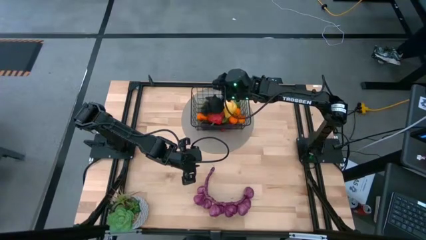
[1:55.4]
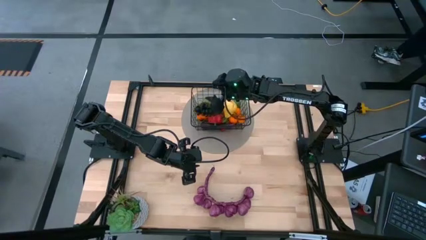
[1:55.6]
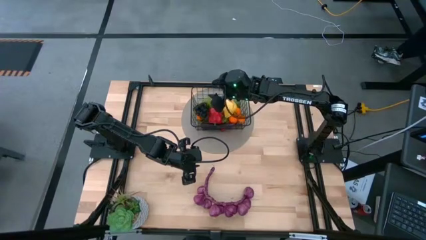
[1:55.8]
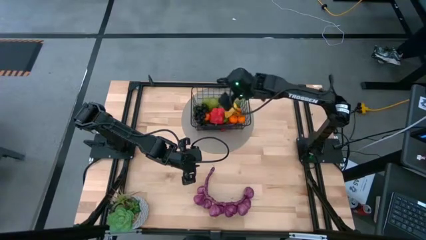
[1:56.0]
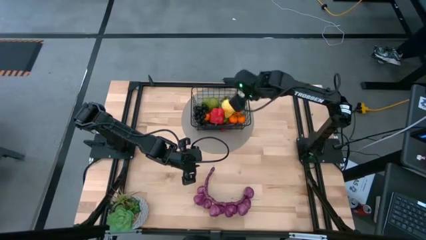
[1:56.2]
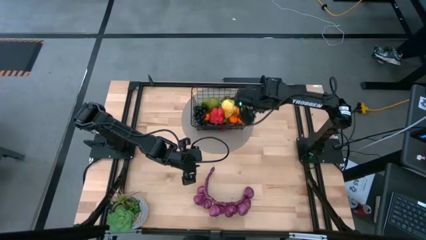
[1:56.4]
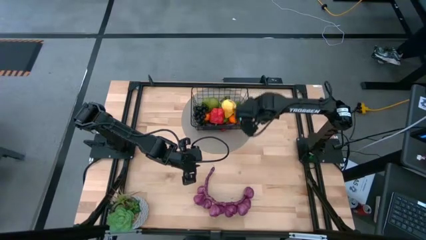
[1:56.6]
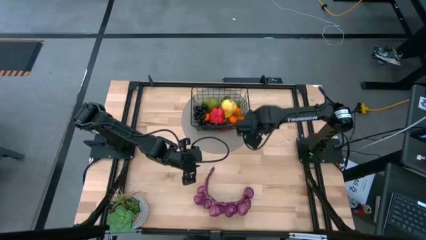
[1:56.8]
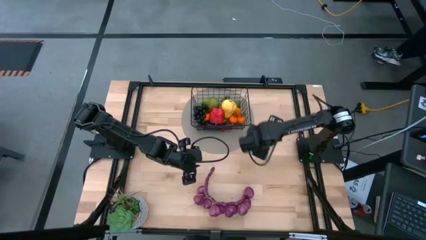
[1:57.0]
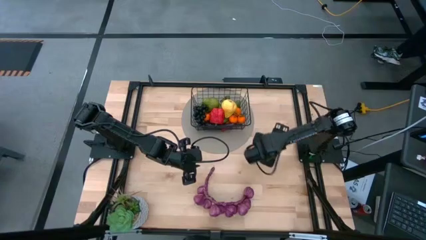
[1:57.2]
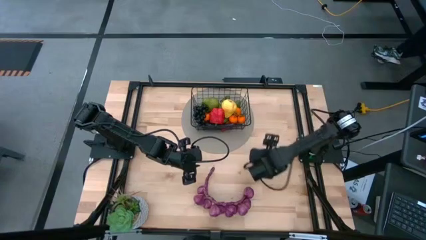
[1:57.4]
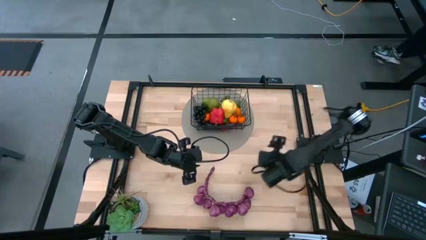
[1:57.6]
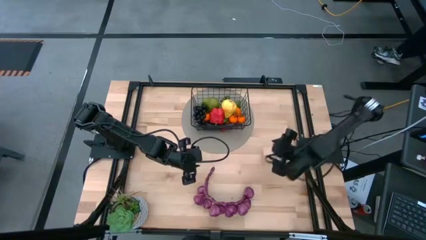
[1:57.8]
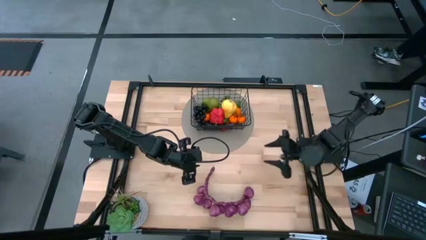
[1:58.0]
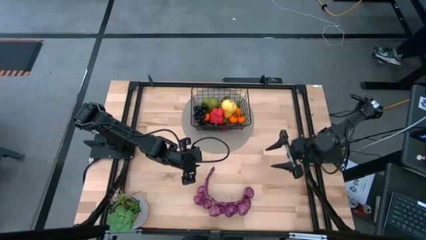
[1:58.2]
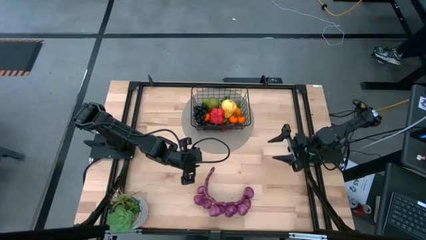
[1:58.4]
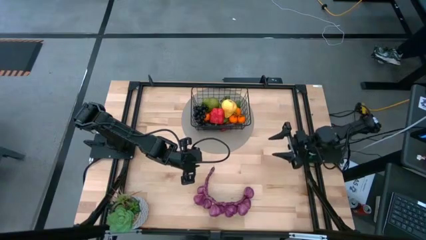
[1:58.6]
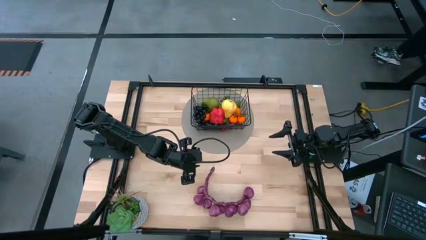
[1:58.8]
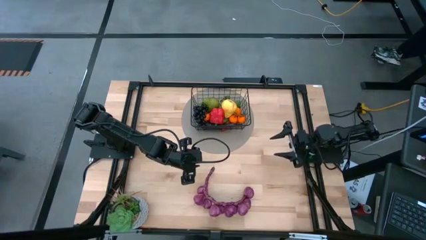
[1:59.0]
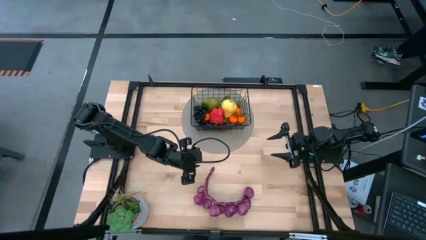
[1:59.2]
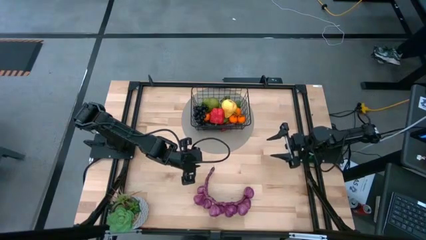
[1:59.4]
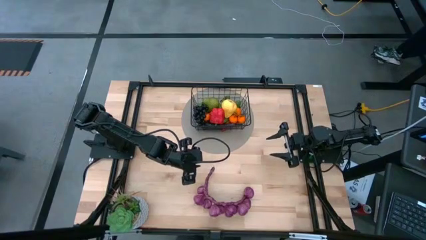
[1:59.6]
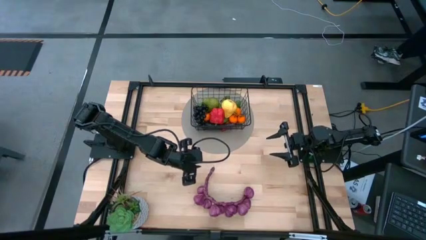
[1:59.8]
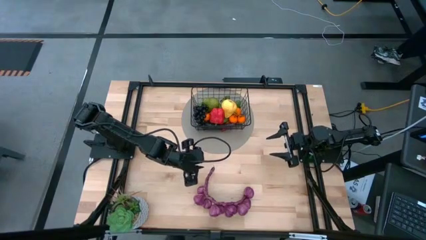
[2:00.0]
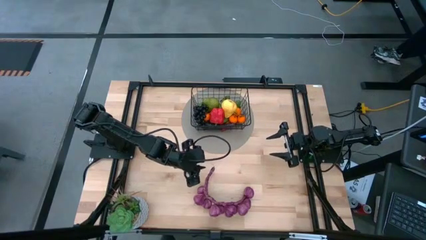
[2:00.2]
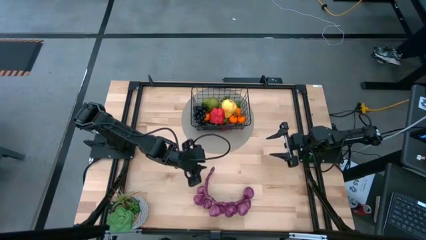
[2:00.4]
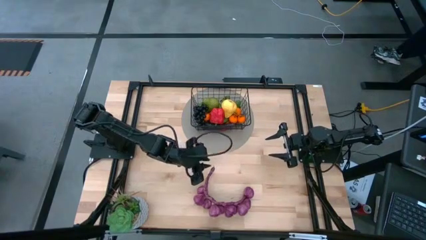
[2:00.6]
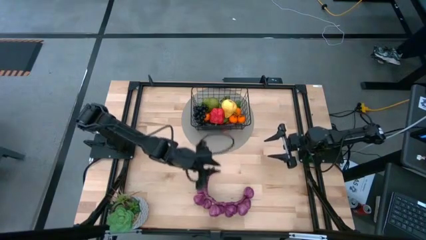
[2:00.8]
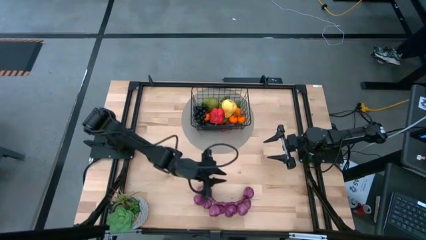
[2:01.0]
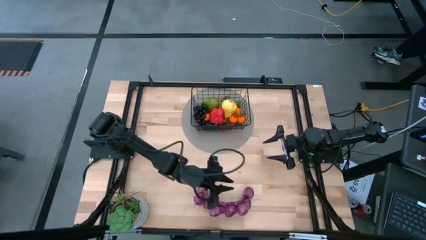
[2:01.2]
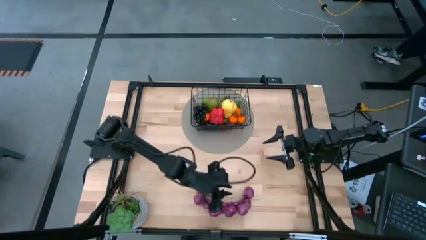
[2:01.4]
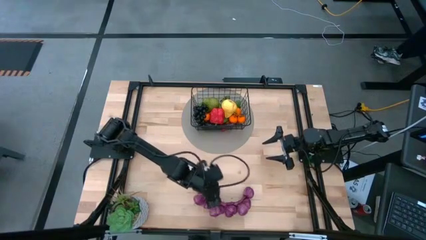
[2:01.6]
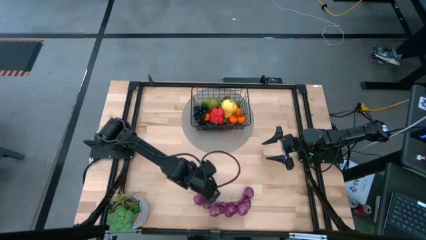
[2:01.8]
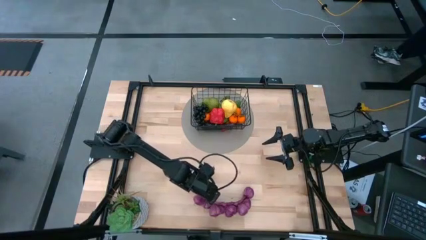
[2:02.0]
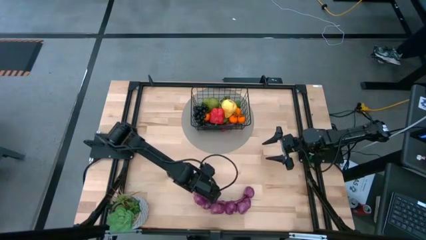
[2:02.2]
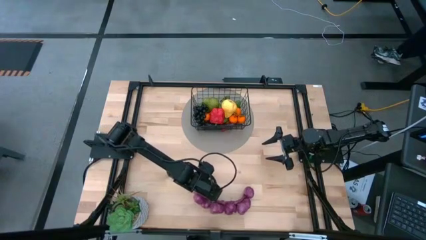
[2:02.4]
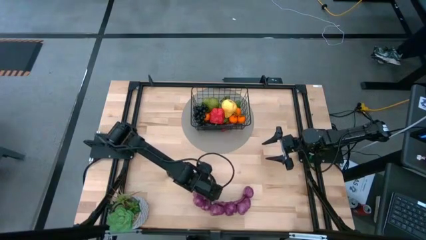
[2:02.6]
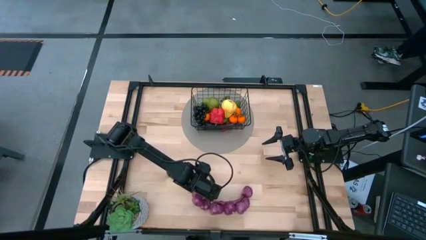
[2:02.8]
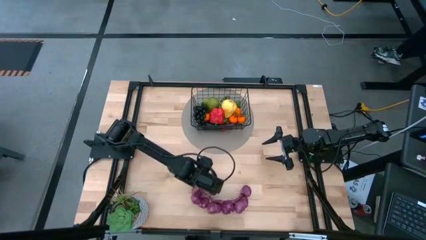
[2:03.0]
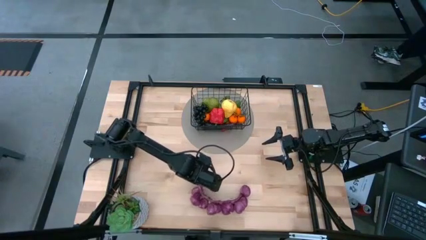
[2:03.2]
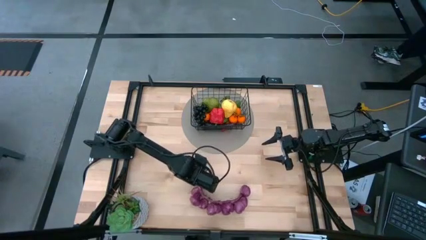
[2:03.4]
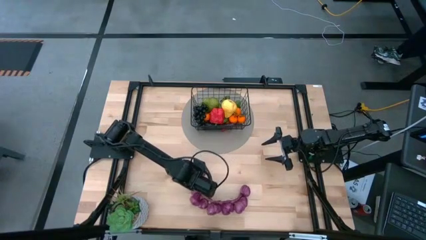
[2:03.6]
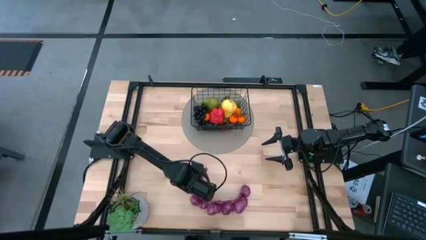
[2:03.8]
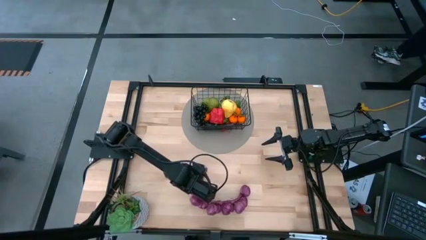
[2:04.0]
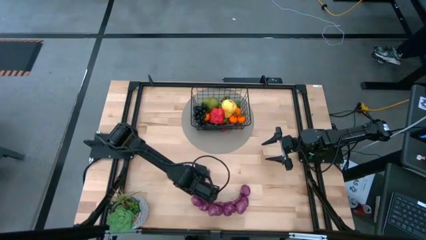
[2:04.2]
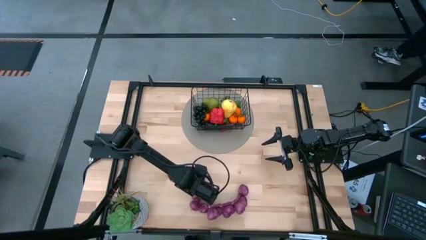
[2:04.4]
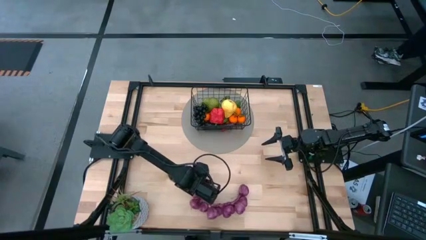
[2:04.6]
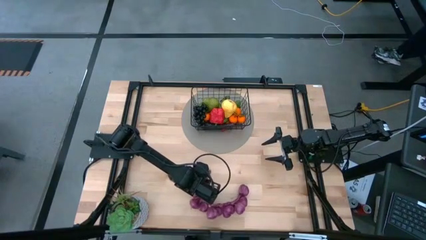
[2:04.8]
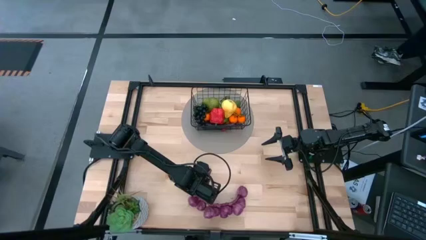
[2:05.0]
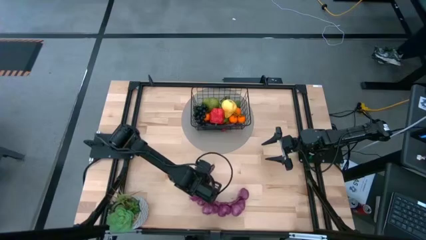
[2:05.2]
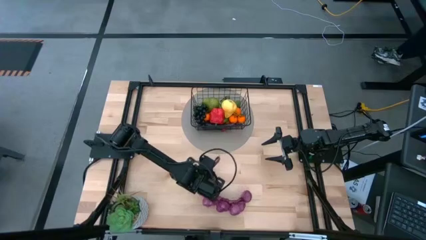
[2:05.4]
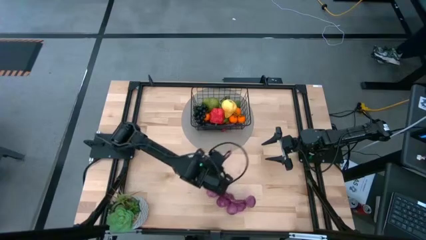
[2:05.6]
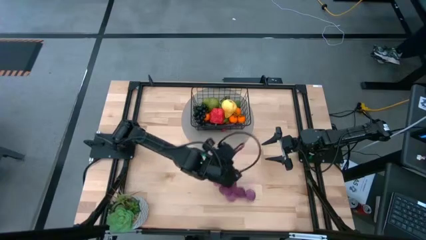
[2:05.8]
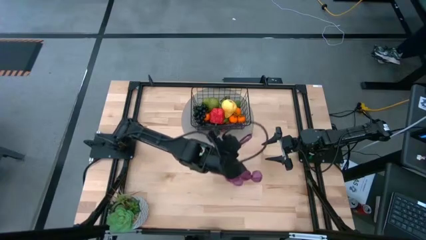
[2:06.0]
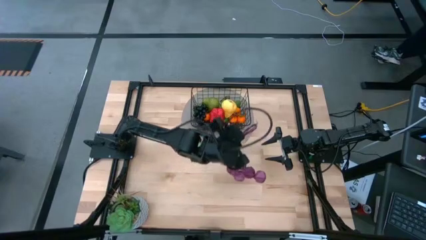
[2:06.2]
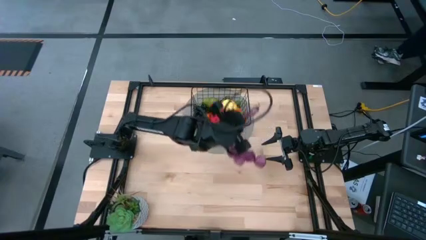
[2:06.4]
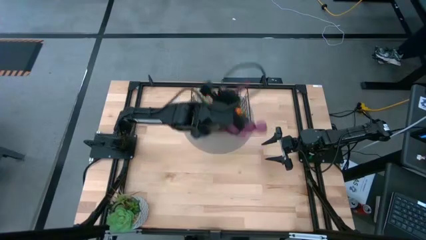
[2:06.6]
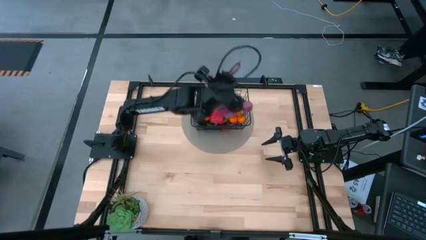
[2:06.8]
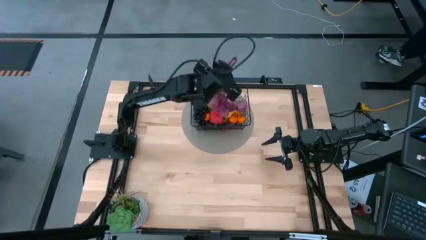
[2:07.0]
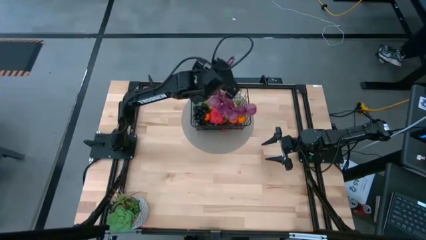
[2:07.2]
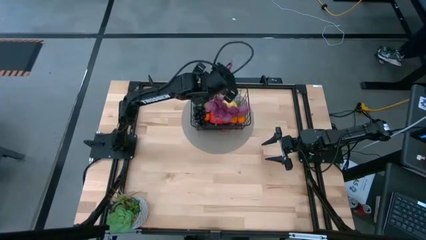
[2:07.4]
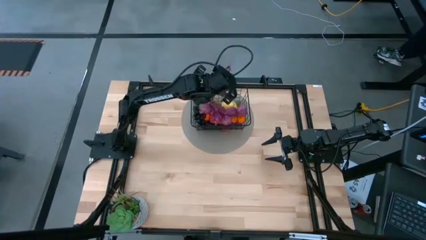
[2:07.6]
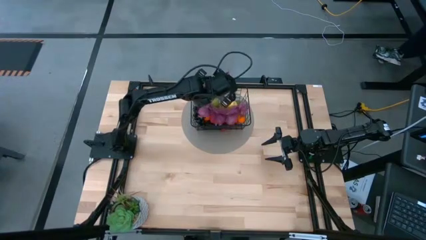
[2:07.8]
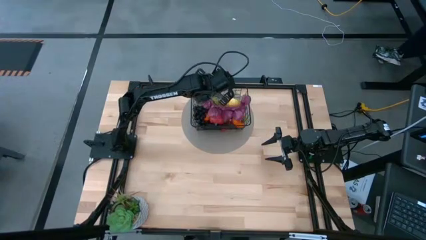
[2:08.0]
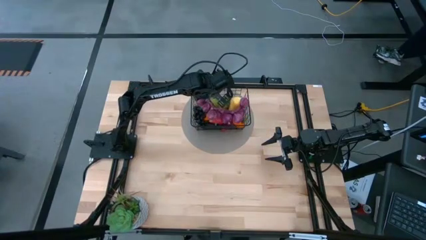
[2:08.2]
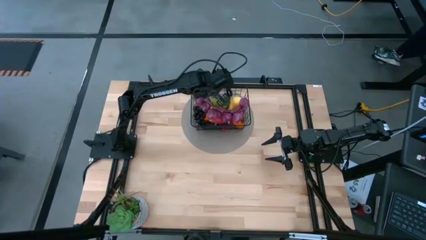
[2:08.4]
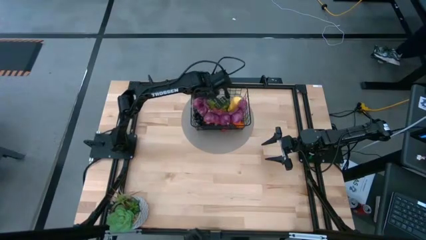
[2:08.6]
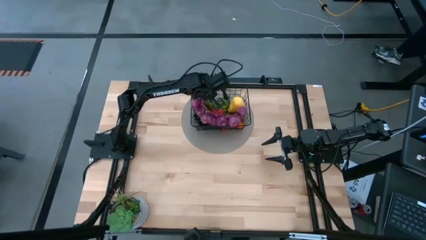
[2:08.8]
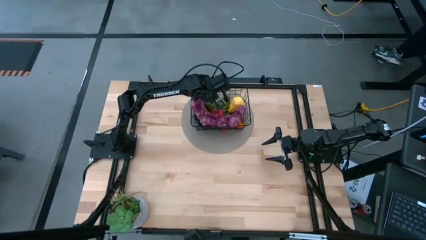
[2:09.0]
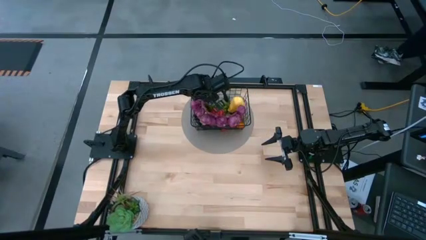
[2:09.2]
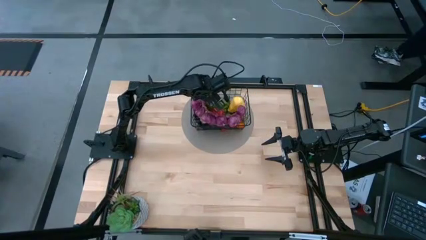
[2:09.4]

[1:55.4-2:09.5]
Task: Build produce basket
Put the purple garlic into the black wire basket

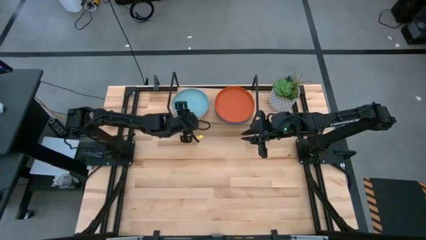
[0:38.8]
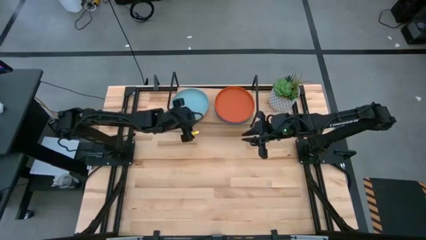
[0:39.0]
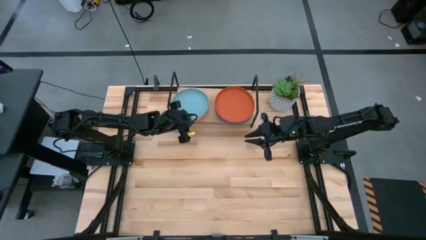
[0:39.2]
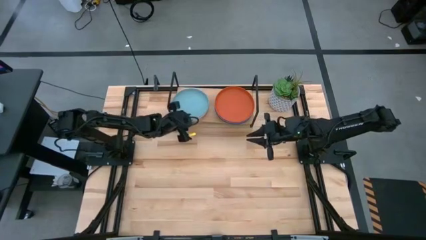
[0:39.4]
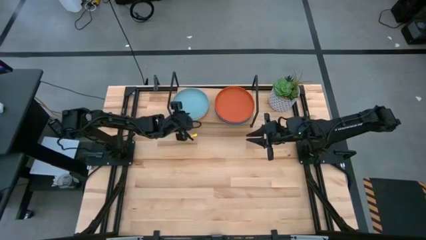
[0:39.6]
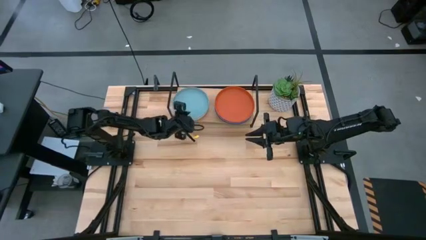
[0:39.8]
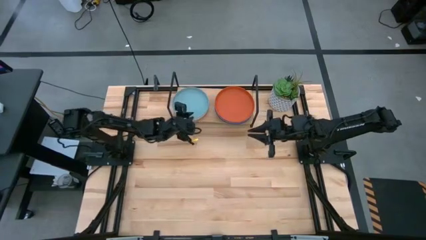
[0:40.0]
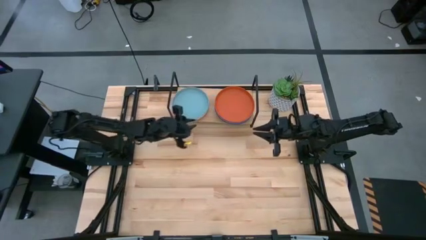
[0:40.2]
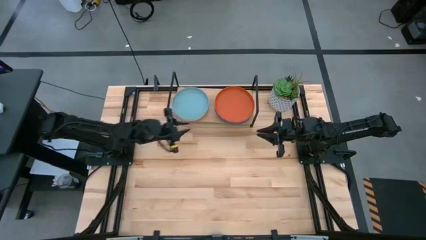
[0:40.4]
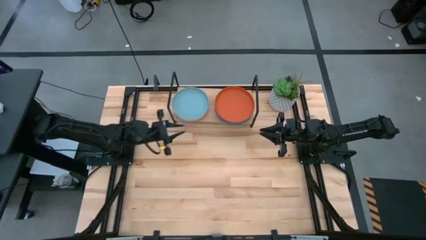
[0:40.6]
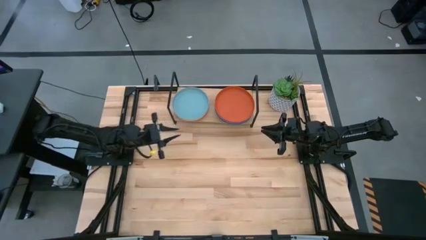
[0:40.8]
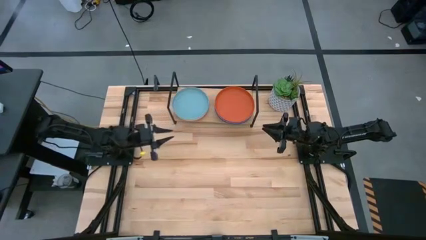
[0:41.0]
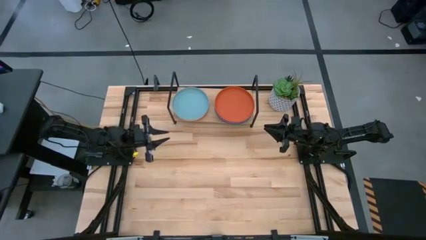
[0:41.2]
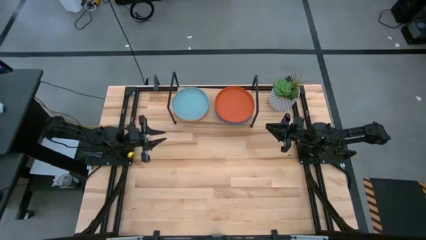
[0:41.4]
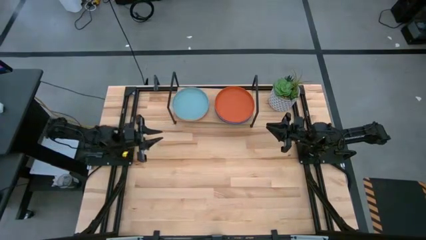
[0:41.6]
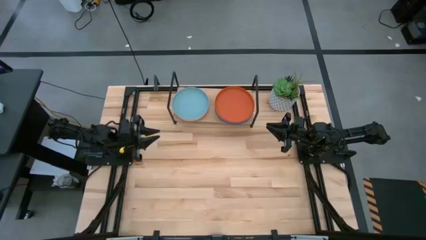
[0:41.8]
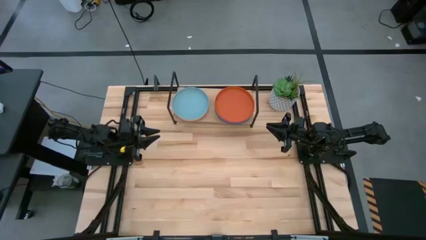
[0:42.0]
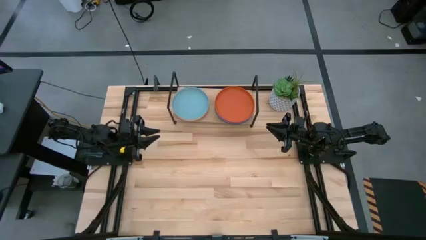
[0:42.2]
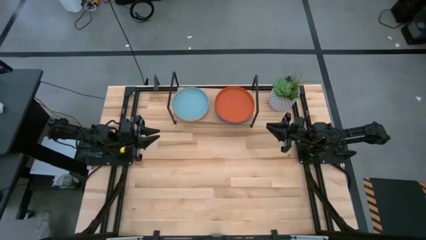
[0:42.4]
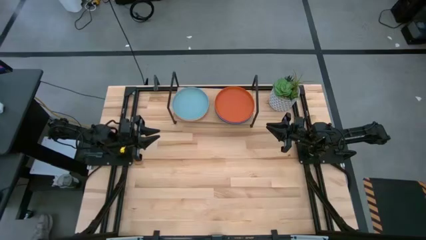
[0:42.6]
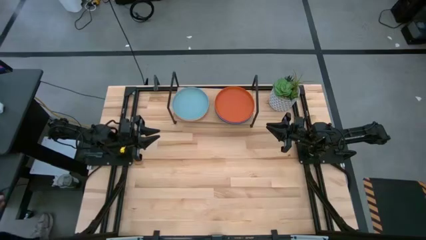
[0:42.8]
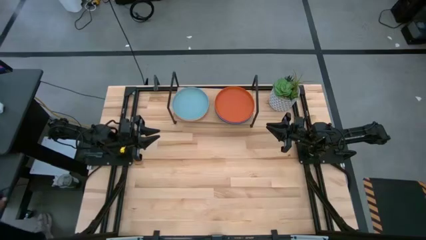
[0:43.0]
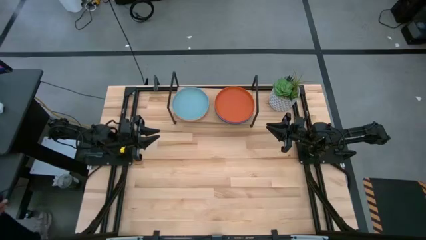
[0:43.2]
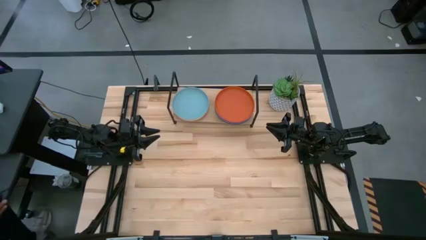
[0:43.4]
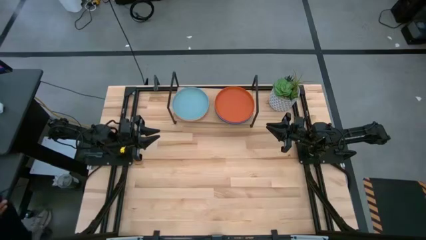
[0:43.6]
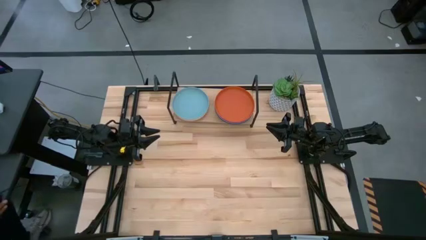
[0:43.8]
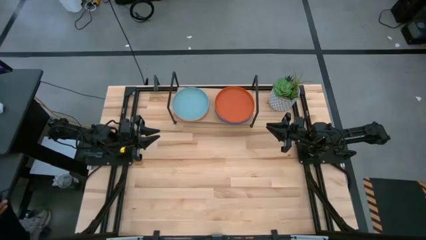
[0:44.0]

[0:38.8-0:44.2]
Task: Place and stack plates onto a shelf
Return to Home Position
